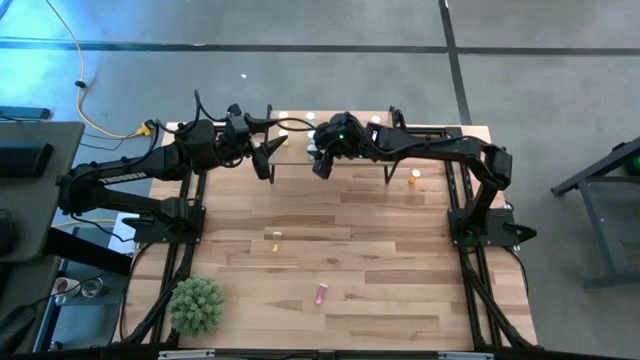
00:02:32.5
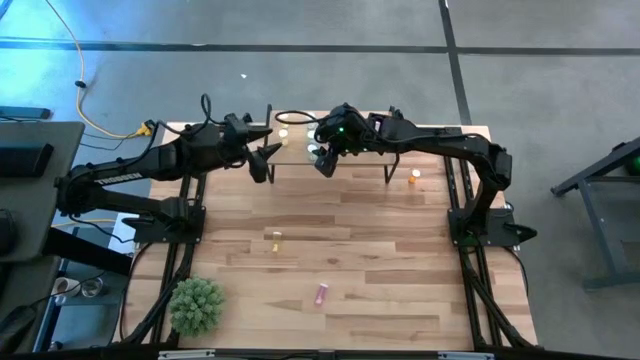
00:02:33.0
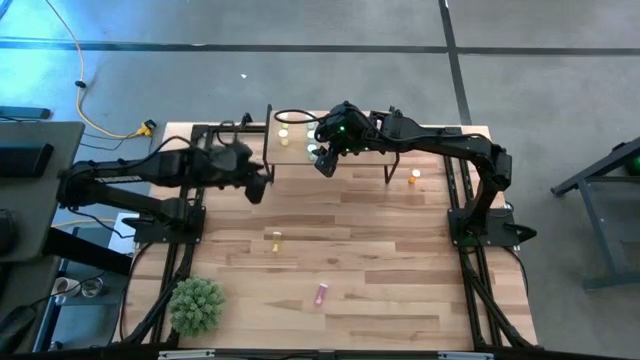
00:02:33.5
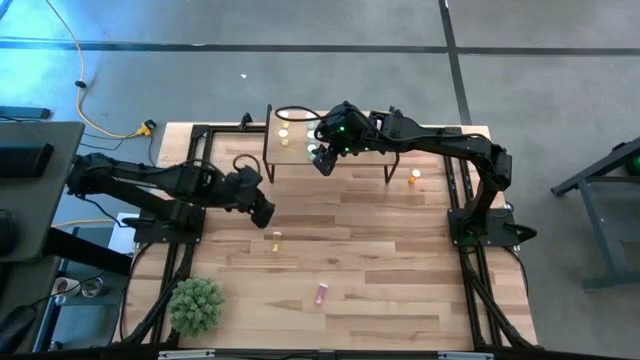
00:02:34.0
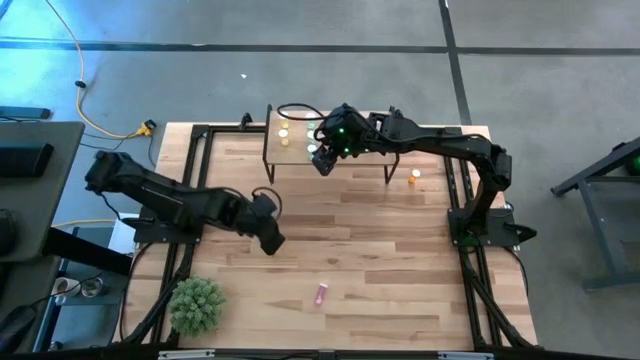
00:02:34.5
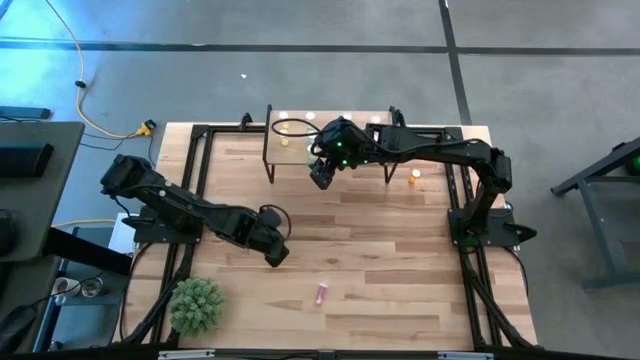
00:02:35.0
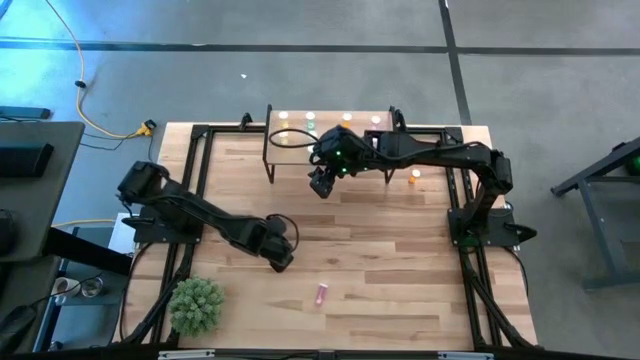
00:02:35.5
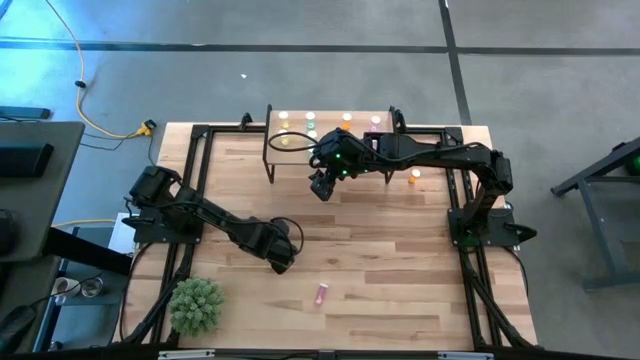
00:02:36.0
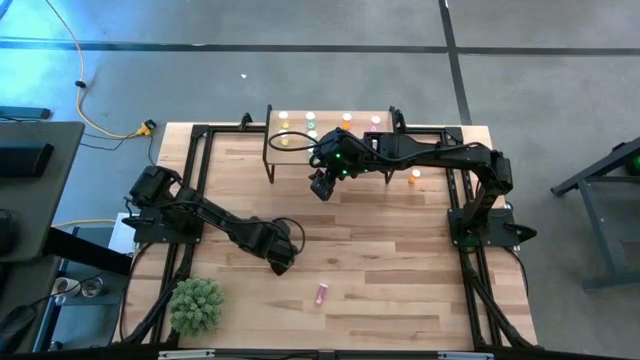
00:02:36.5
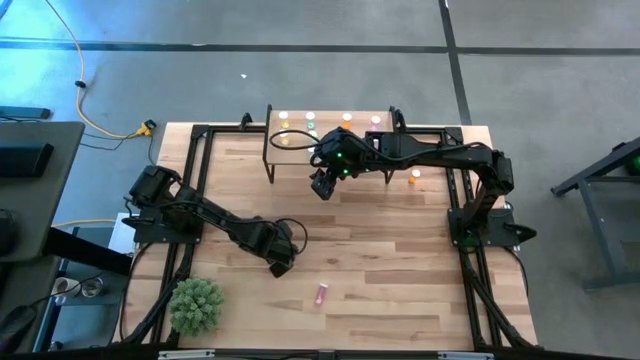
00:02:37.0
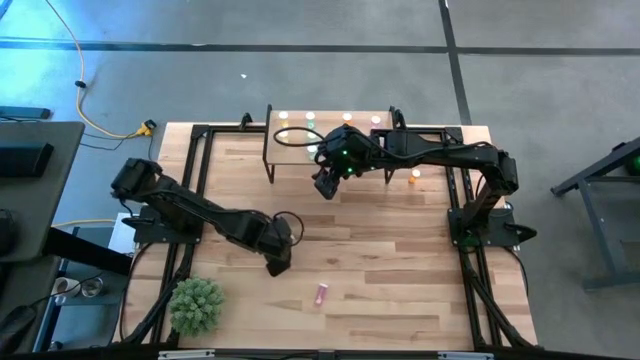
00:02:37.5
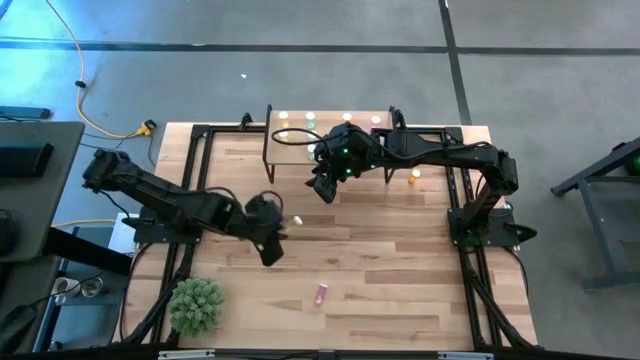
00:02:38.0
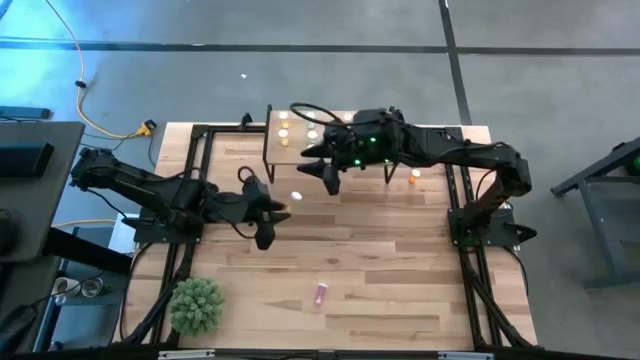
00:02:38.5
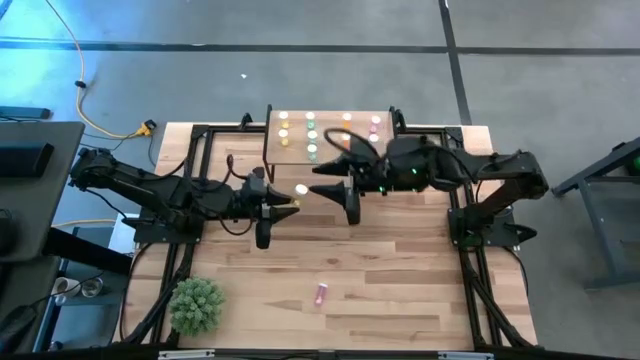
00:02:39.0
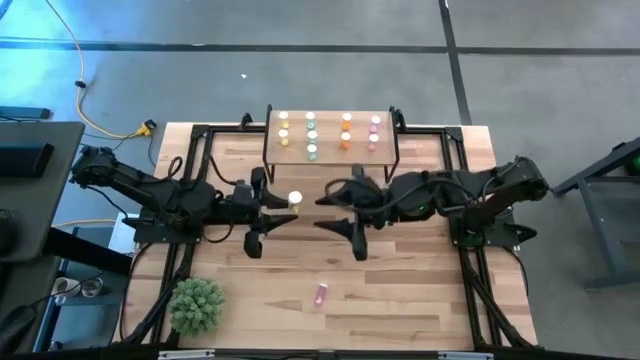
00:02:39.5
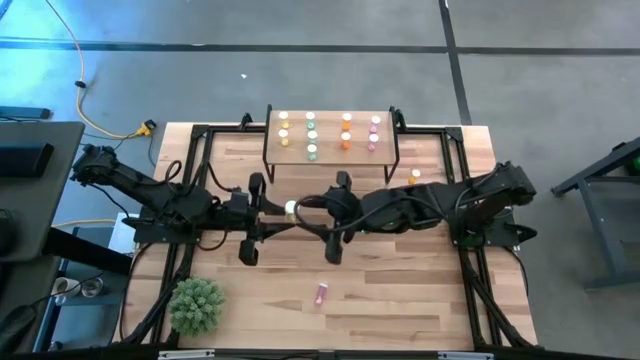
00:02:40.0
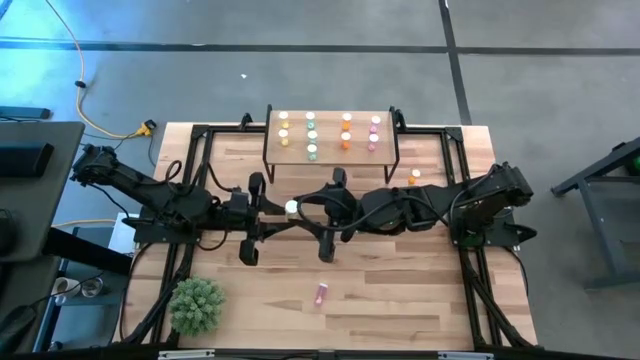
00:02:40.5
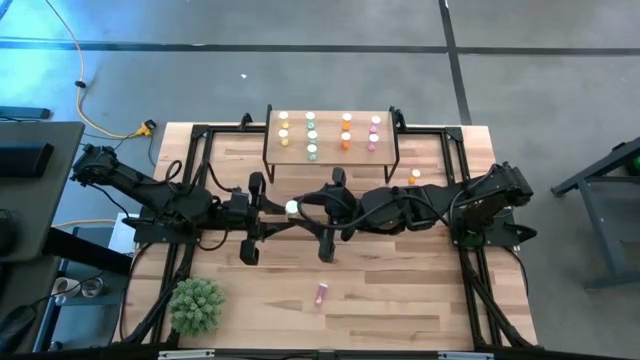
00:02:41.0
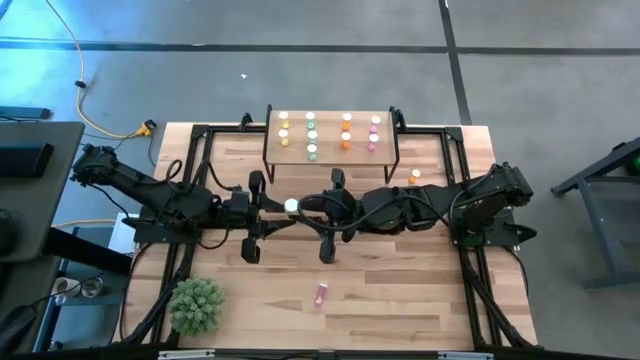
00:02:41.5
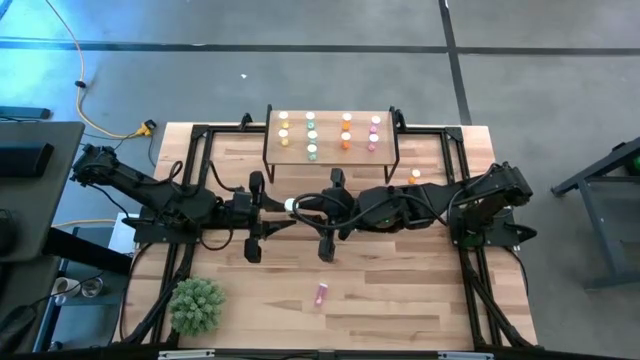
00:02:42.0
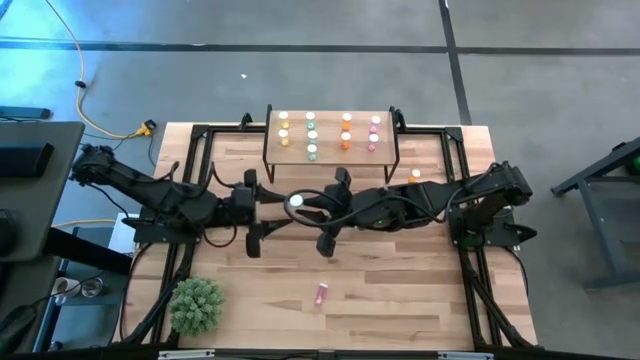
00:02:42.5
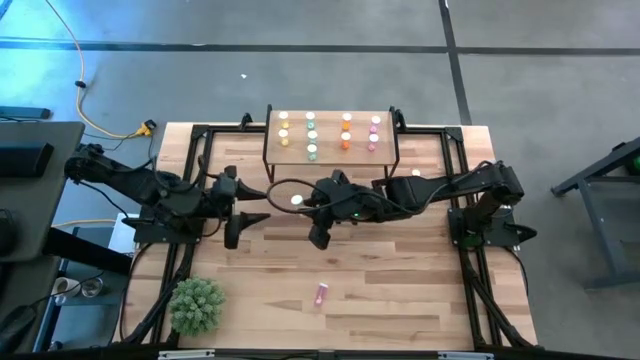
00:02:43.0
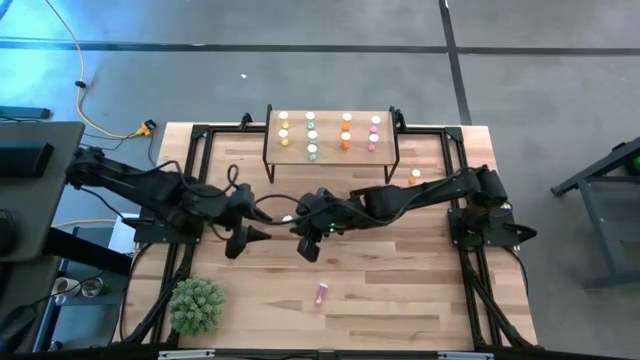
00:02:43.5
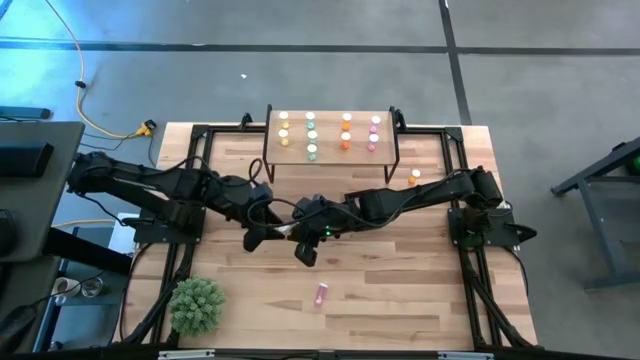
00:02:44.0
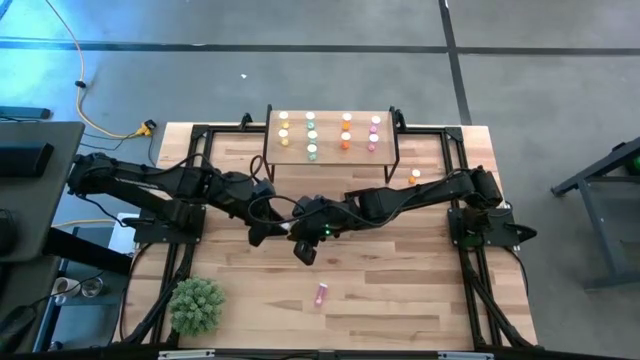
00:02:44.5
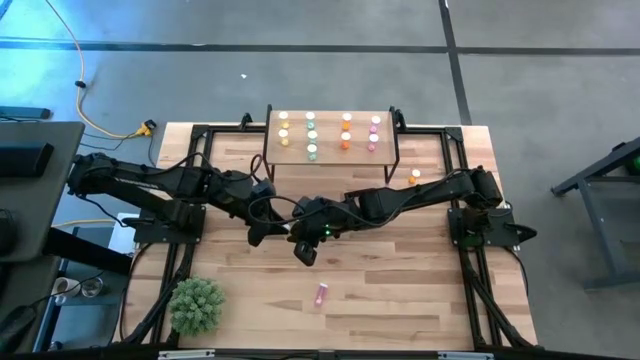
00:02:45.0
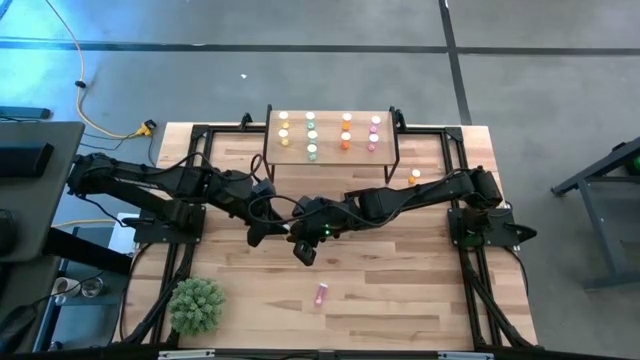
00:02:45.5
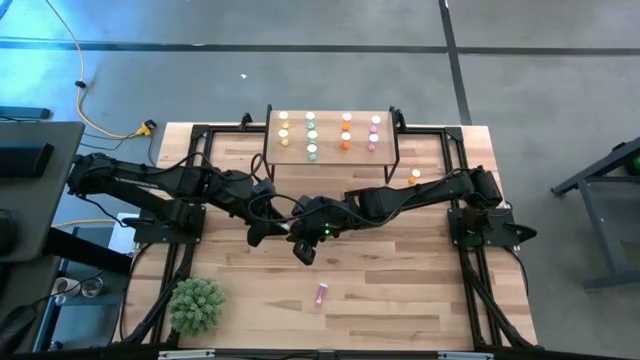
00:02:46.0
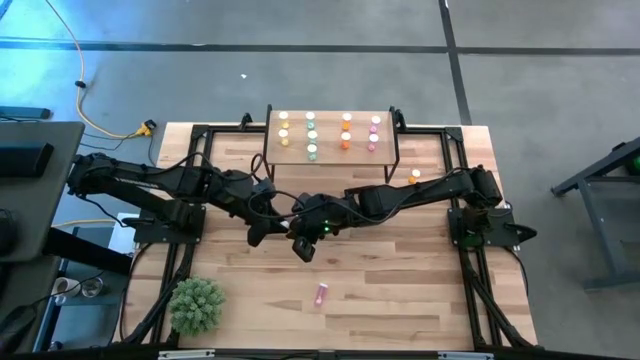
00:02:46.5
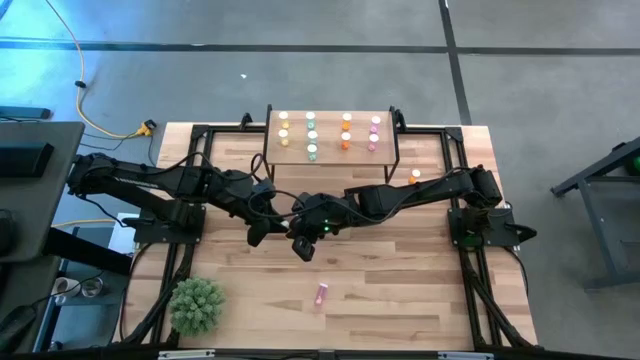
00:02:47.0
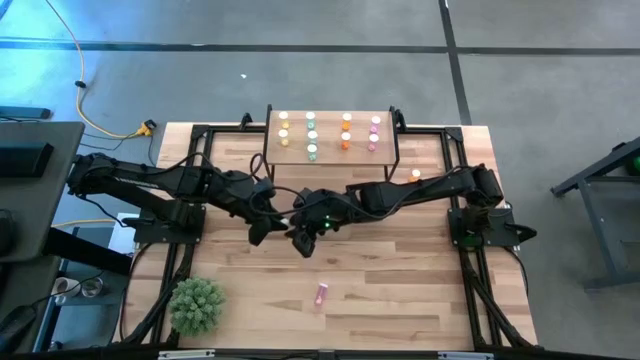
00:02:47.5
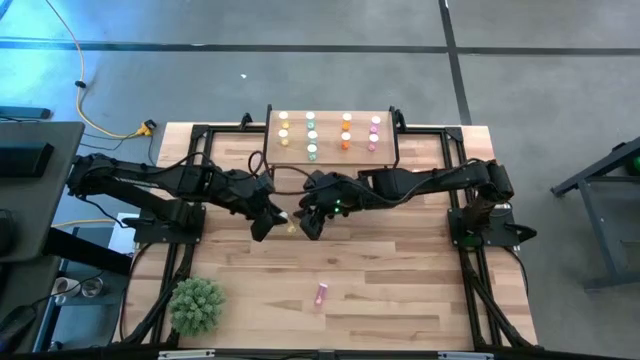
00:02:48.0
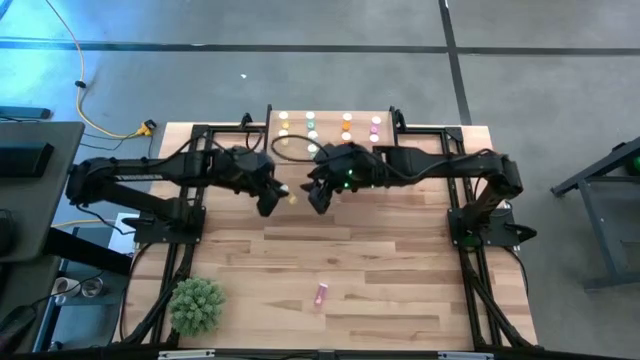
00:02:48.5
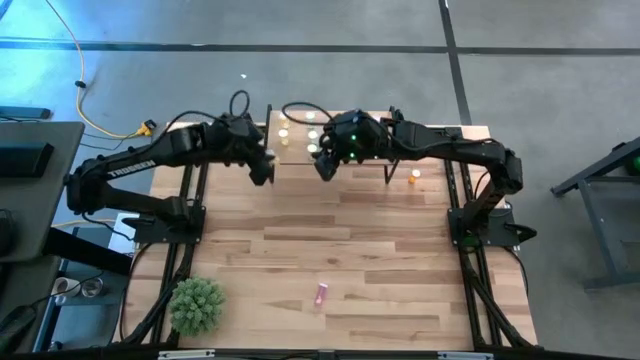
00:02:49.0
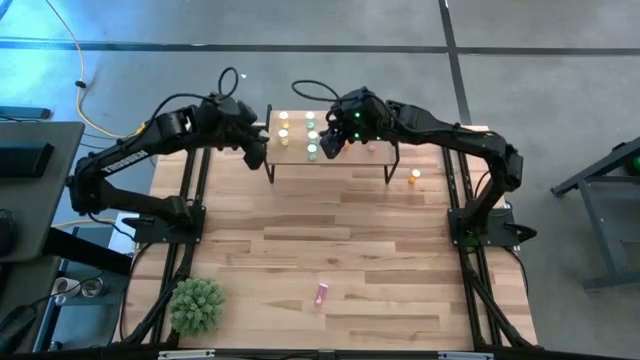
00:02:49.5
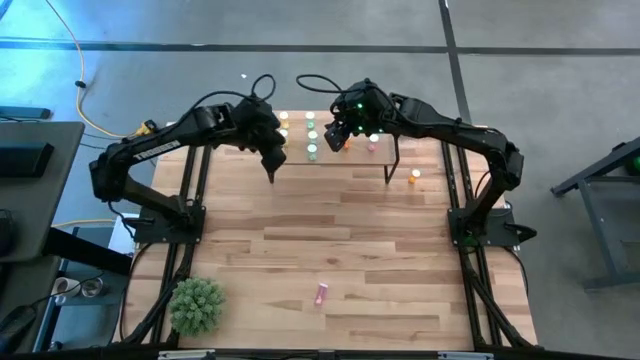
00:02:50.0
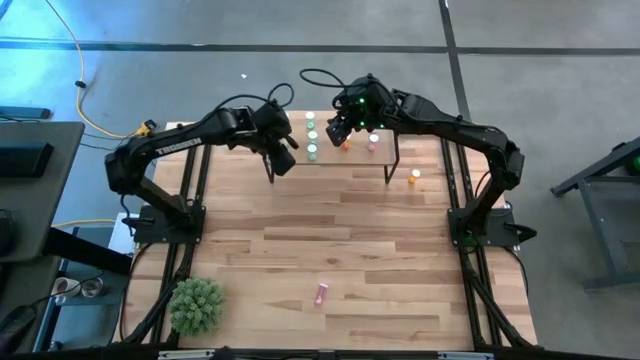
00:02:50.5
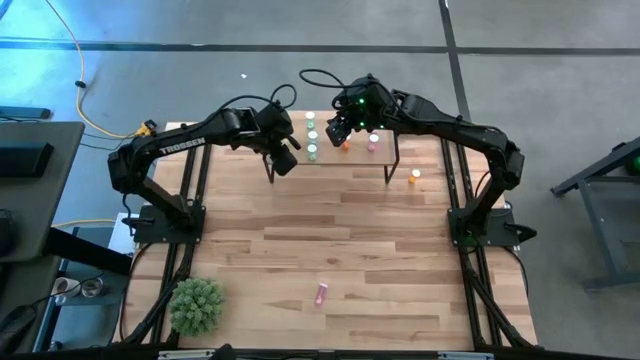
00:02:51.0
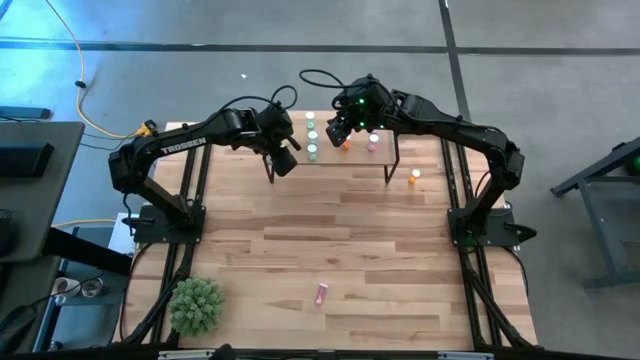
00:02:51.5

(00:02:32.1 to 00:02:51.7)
Task: Pick and place medicine bottles onto shelf by color
Put the yellow pill bottle on the shelf aligned with the other yellow pill bottles

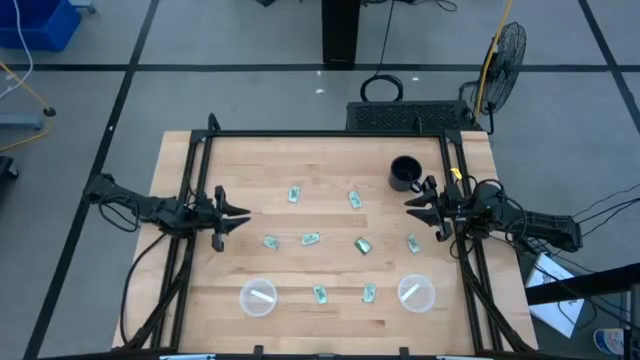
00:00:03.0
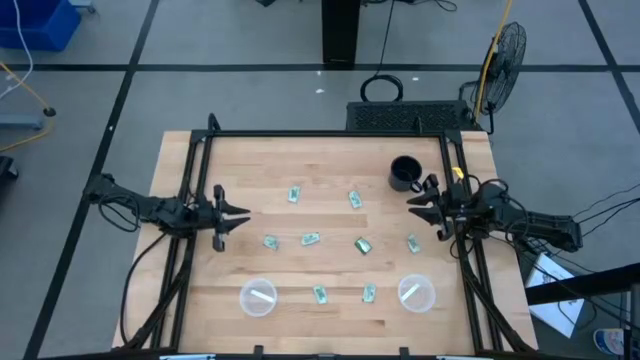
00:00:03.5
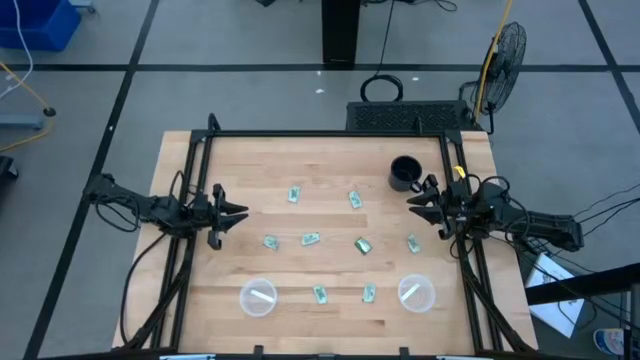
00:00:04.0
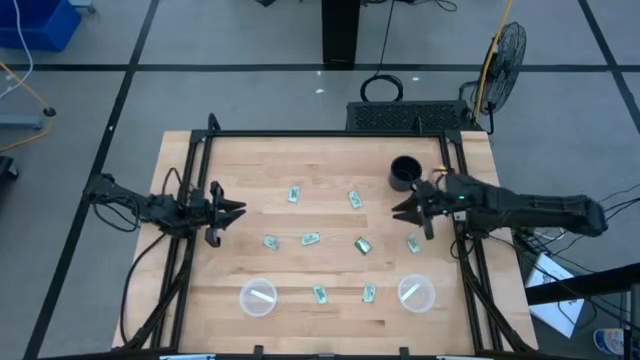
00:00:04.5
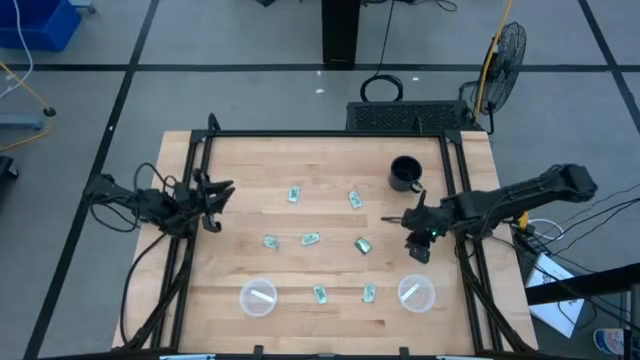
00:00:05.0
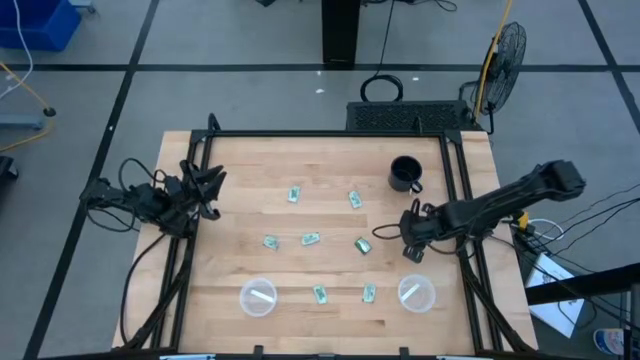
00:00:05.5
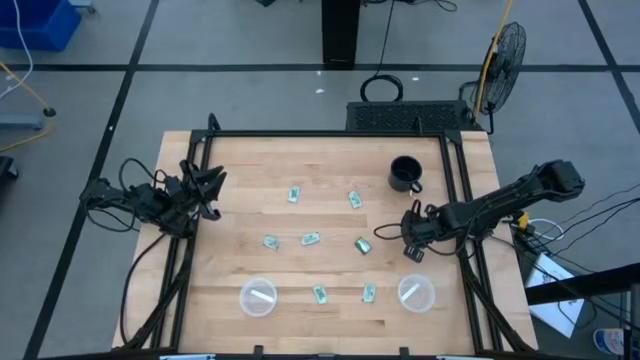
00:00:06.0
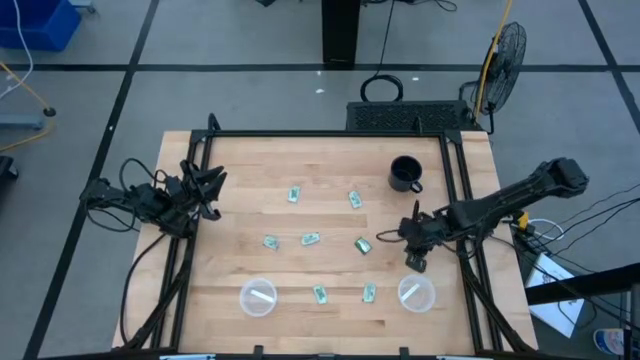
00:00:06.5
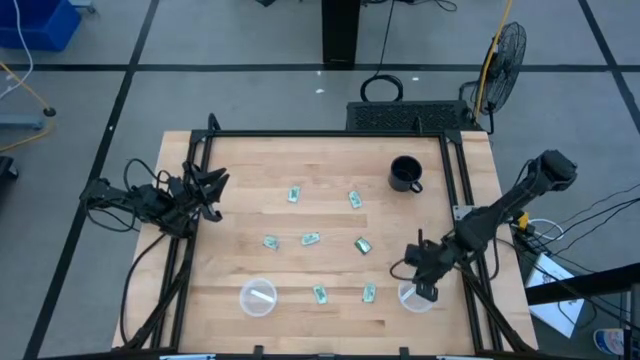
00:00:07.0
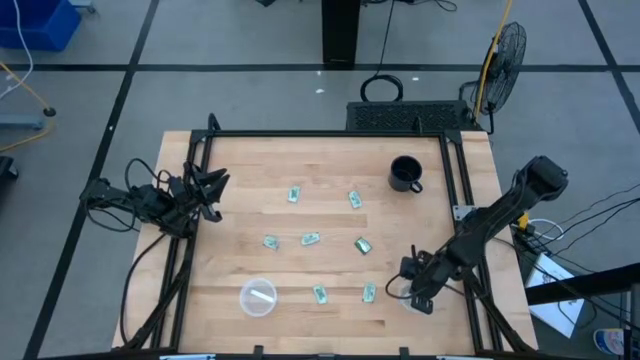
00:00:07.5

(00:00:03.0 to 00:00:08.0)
Task: Pick and place Stevia / Truvia into bins
Put the stevia packet into the right transparent container
